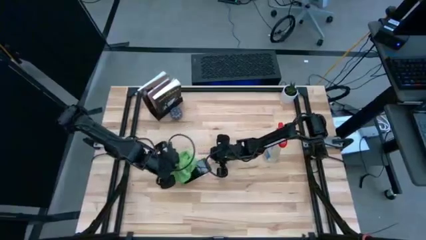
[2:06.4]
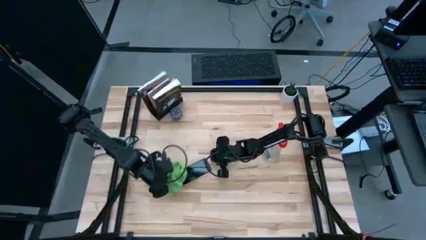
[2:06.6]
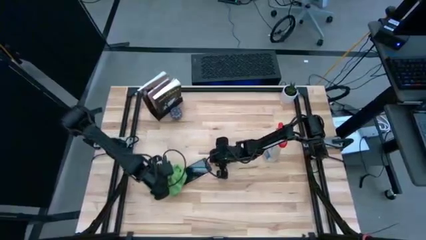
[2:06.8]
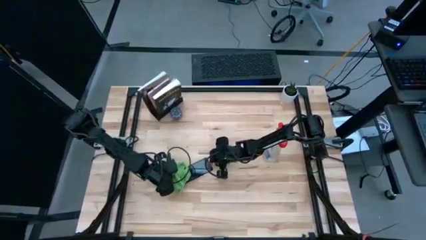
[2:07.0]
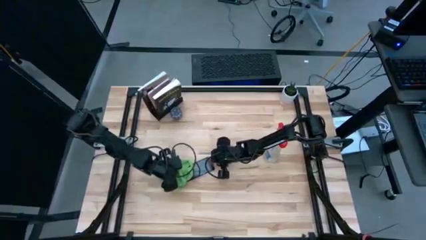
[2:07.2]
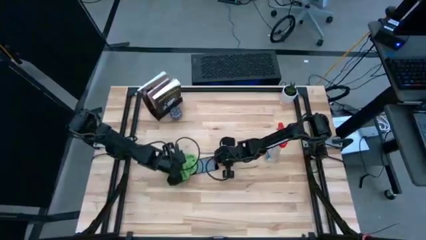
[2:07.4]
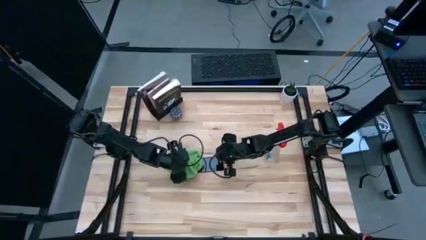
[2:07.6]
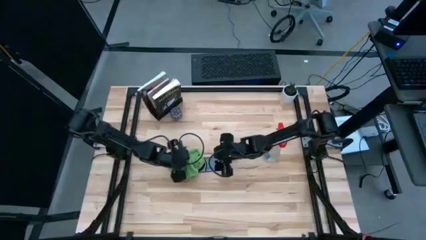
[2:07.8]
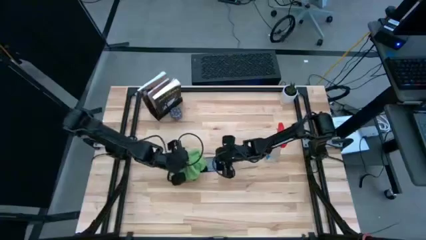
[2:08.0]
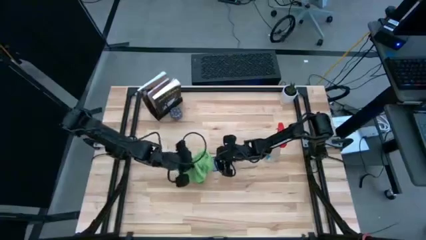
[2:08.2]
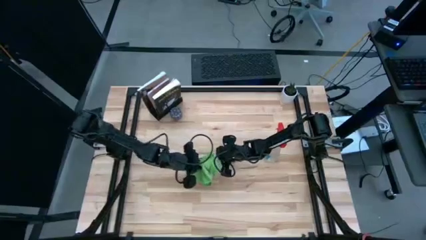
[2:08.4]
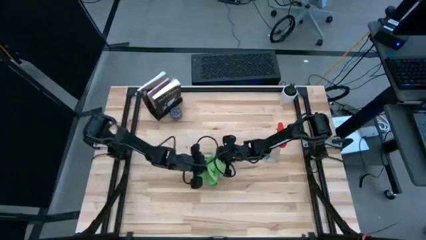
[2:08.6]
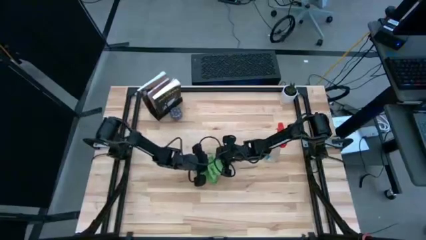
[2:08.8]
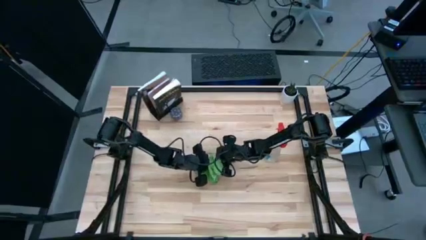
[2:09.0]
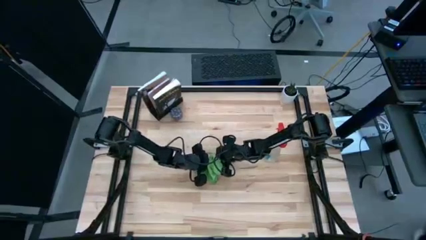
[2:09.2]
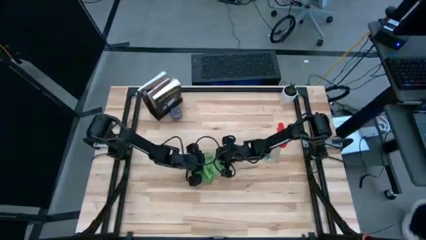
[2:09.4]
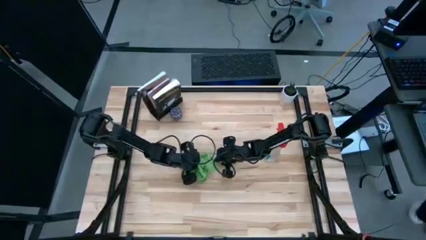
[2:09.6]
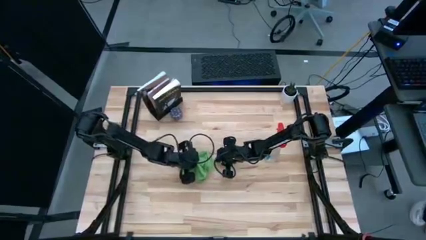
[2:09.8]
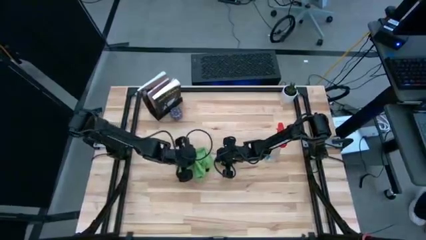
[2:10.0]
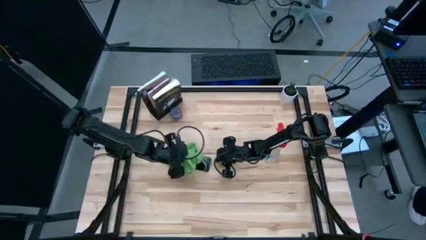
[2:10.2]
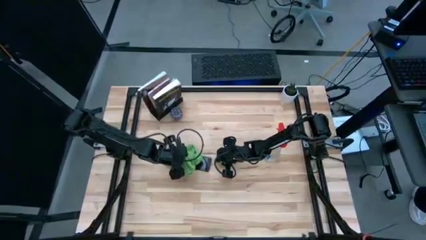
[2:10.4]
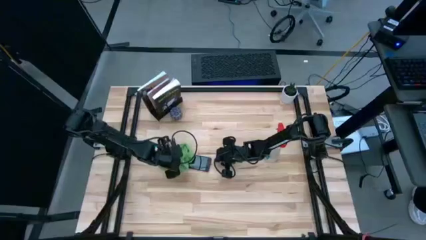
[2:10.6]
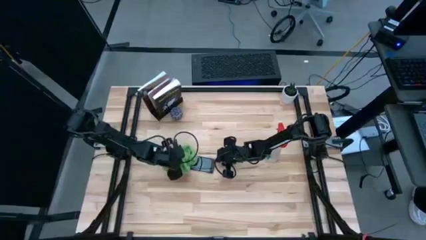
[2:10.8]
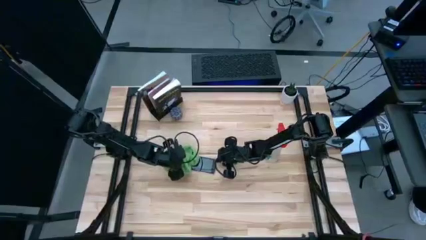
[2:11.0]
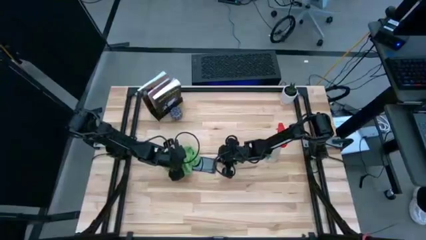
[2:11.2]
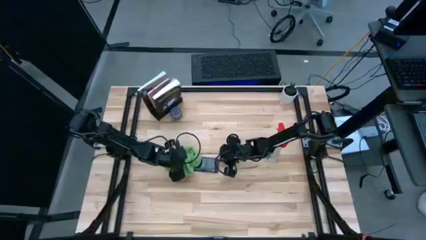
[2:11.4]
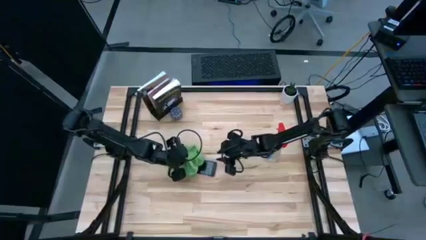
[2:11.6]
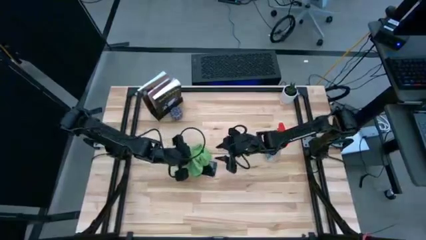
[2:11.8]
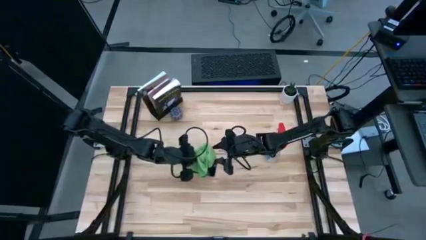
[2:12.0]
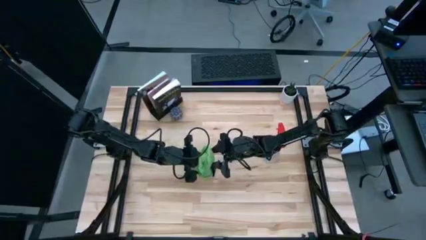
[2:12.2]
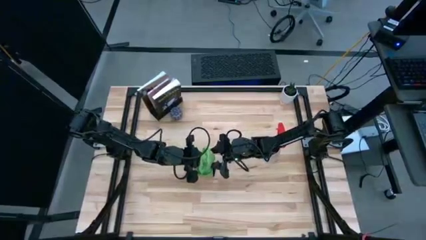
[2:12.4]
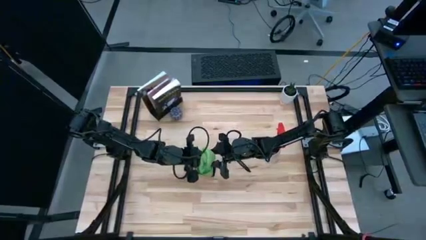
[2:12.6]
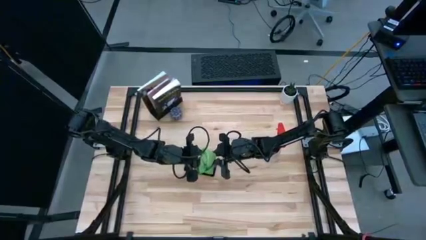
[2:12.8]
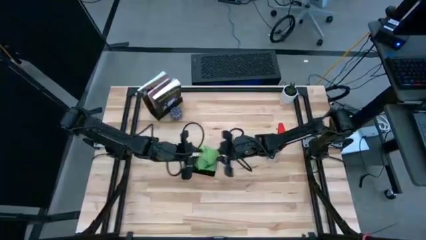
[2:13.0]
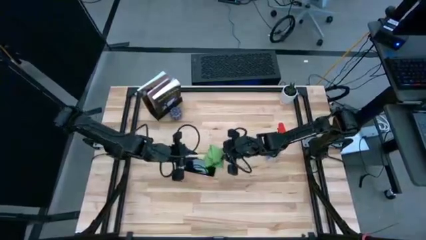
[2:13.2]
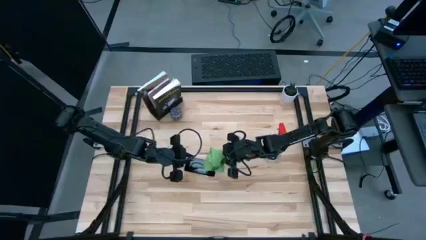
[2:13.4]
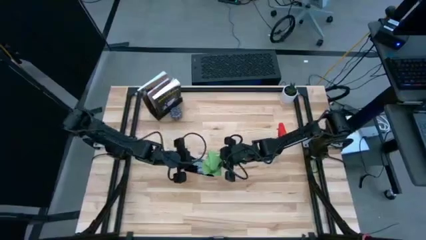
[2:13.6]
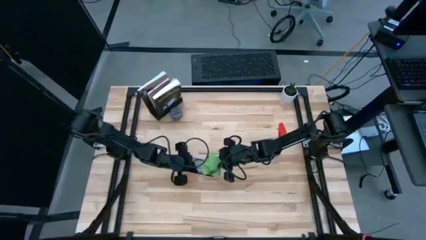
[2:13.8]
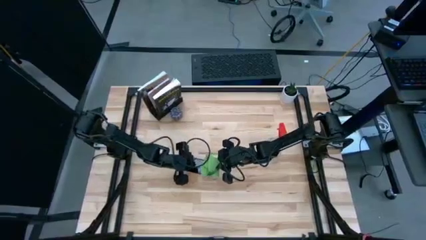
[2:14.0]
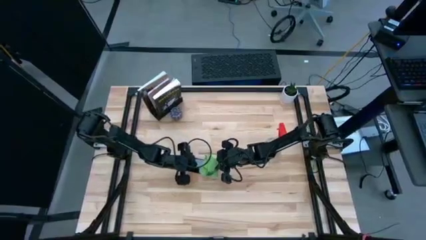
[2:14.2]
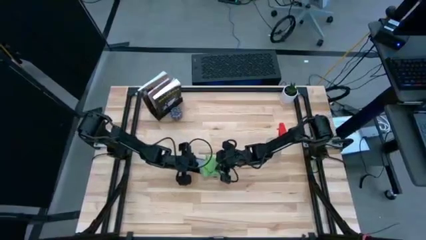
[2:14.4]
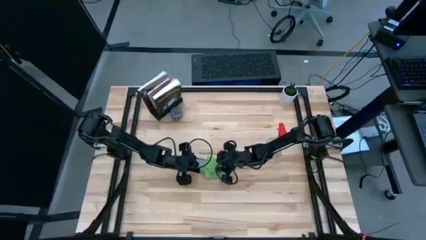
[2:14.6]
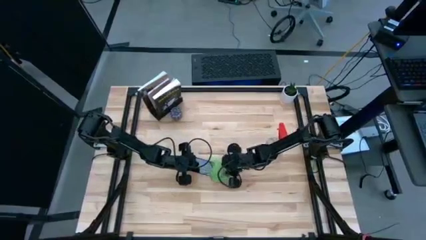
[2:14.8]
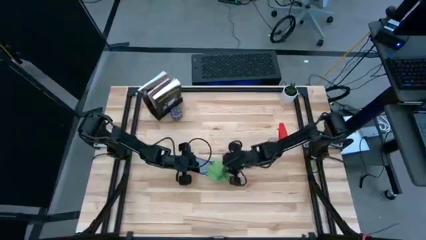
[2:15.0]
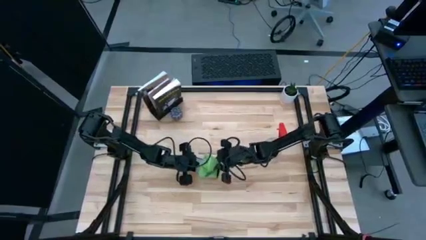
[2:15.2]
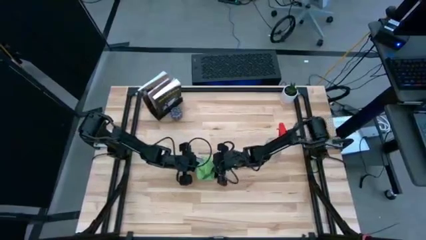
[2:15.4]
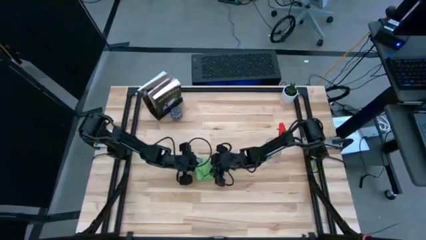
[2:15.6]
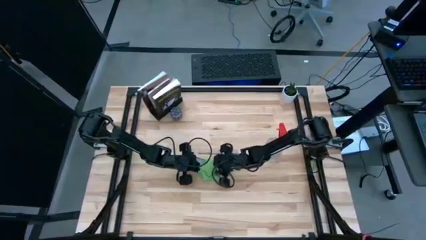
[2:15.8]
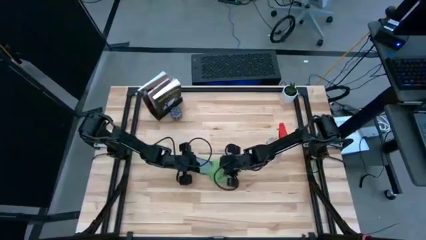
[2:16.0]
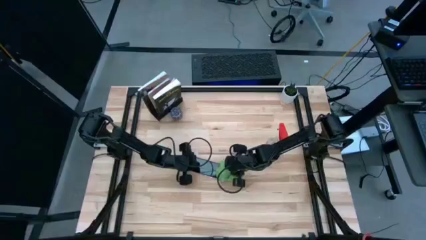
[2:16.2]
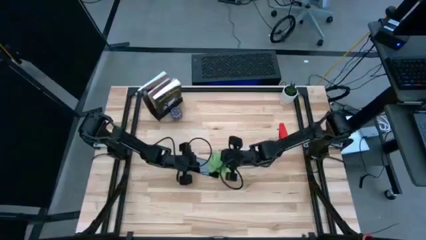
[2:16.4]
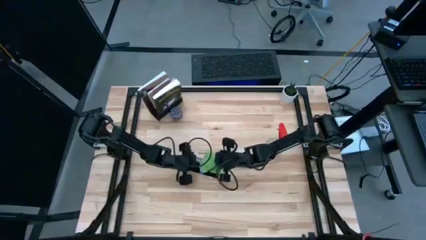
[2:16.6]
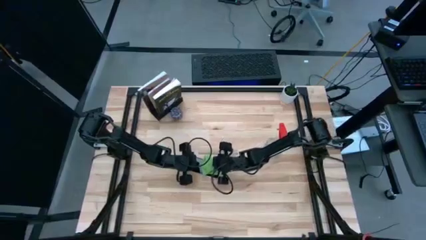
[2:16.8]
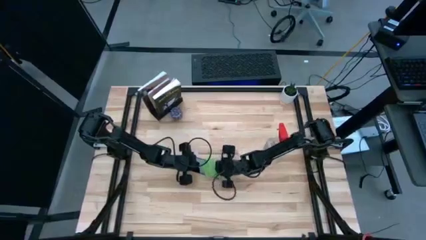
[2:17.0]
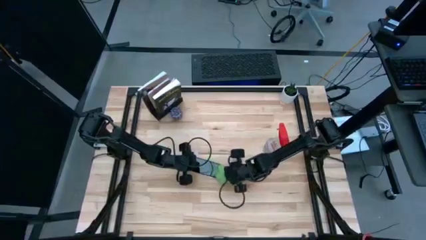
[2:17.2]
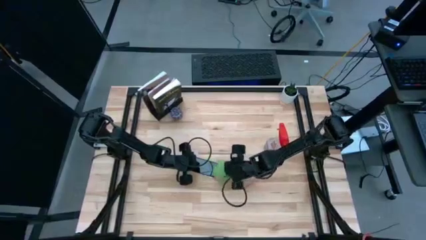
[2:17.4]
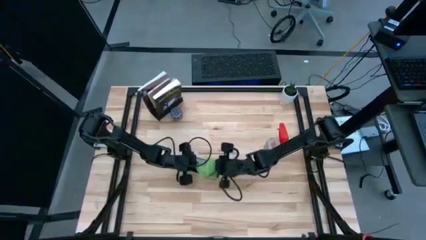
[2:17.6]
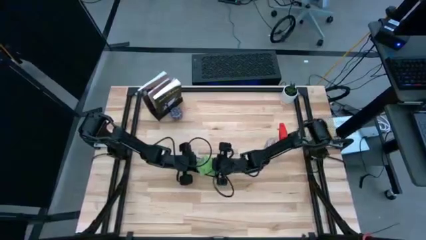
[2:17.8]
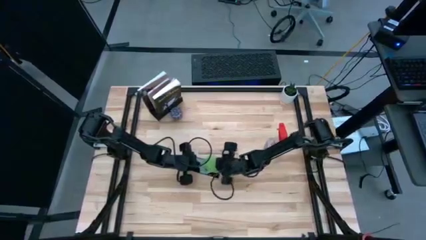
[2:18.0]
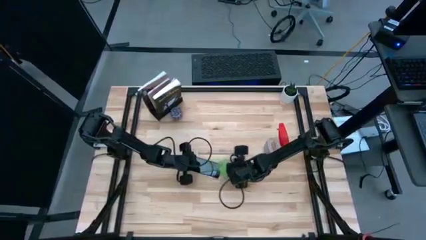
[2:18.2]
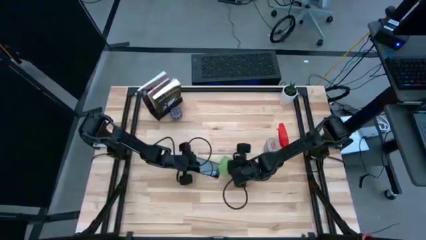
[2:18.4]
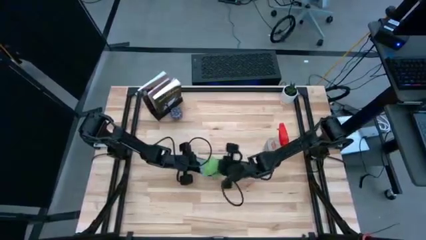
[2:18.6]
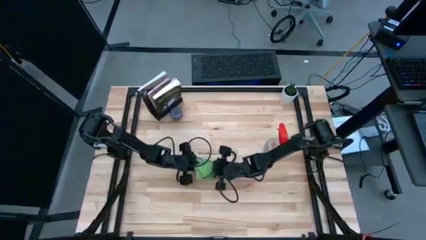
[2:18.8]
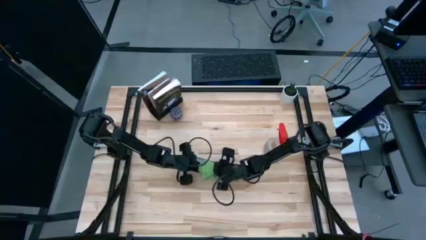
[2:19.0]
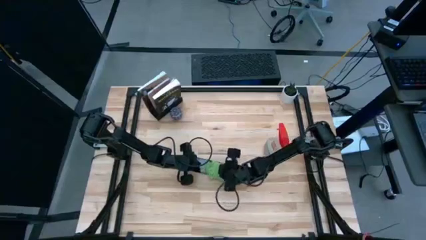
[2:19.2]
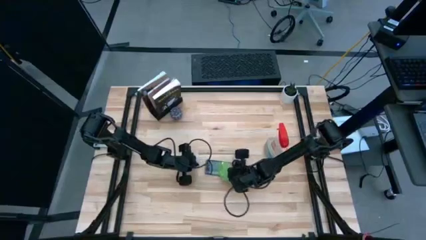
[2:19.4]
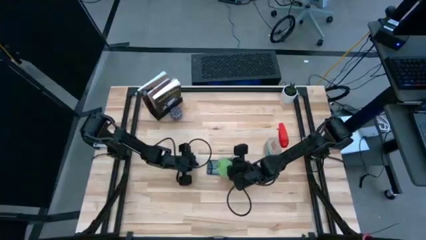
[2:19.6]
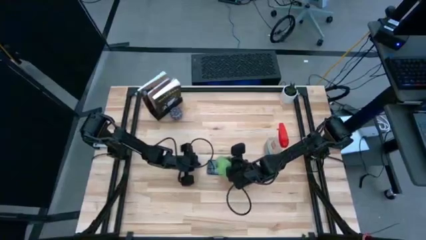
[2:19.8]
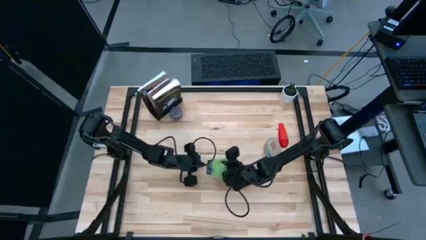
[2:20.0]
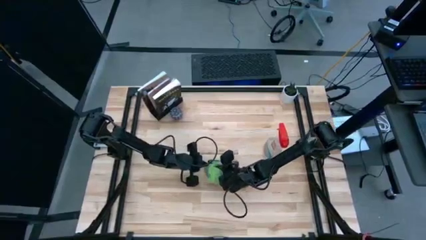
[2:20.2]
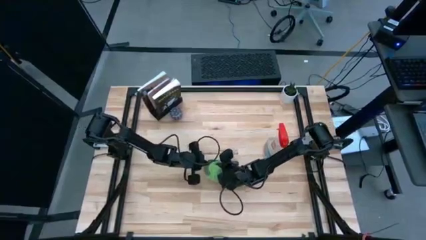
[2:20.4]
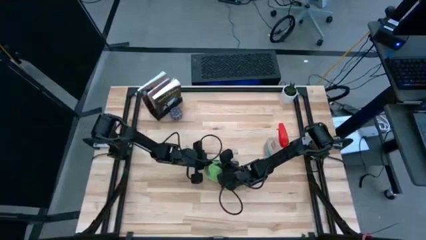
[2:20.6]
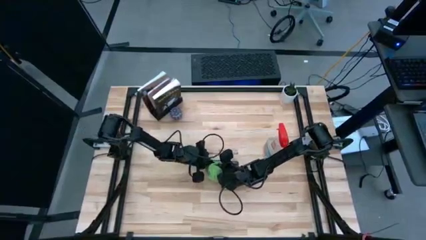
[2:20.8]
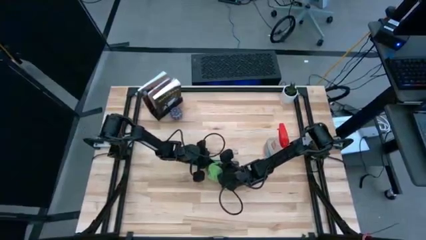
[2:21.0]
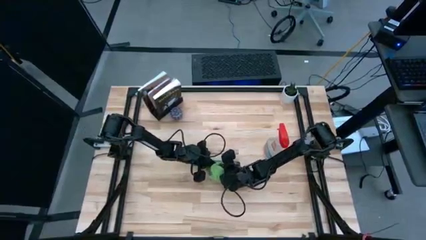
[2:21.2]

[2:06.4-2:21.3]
Task: Apply microfiber cloth
Wipe the front of the pink cellphone with the green microfiber cloth
